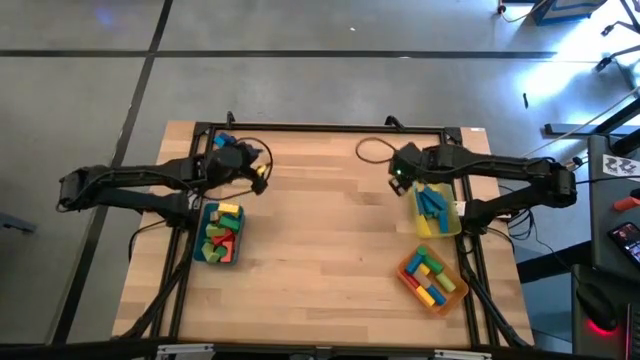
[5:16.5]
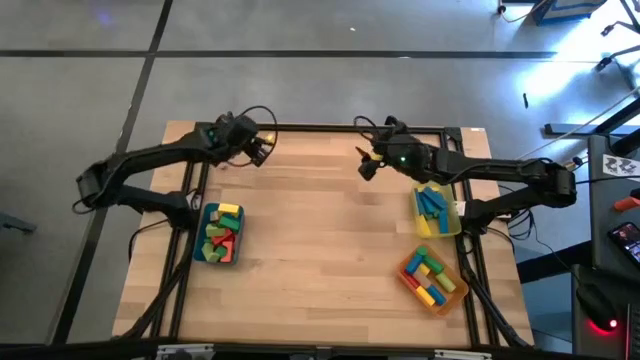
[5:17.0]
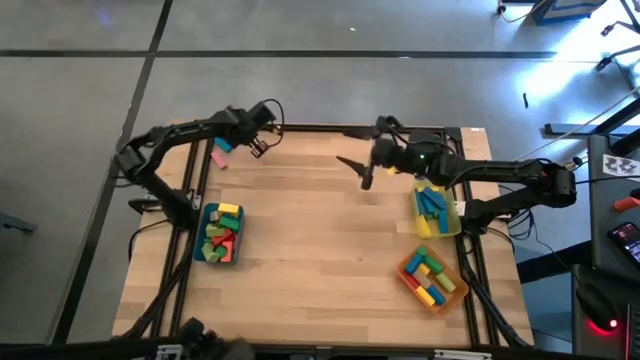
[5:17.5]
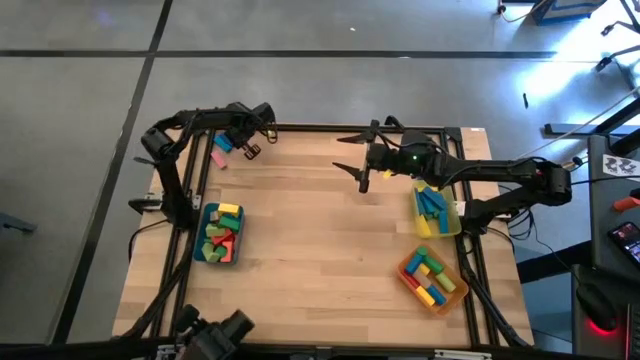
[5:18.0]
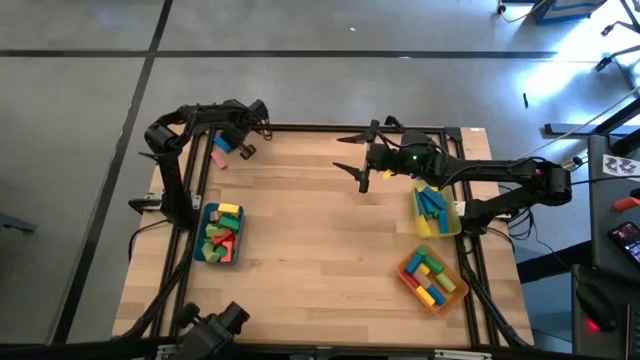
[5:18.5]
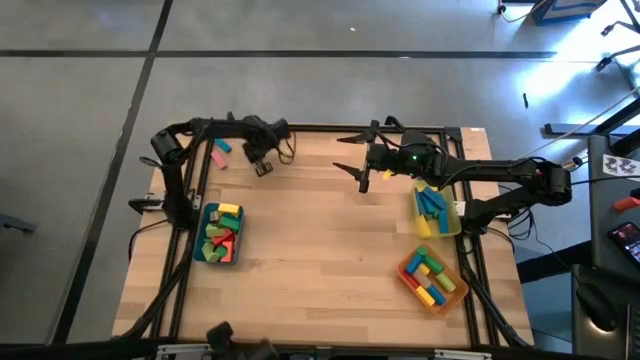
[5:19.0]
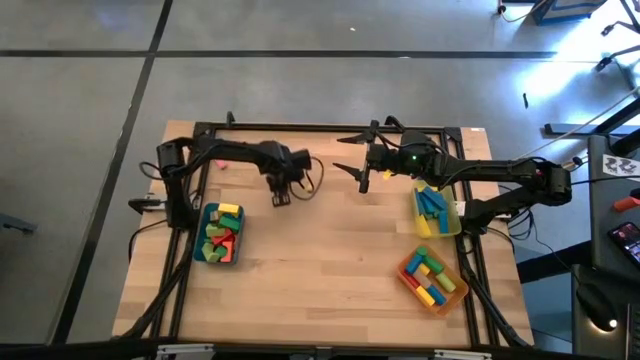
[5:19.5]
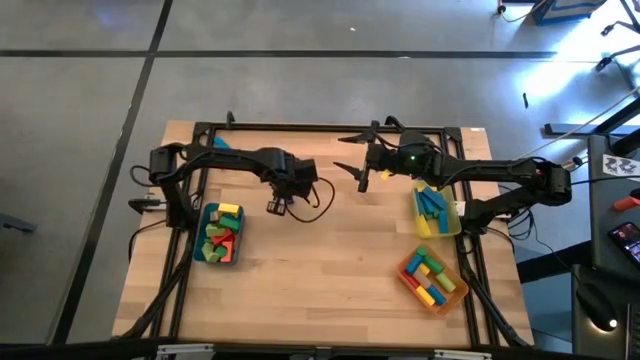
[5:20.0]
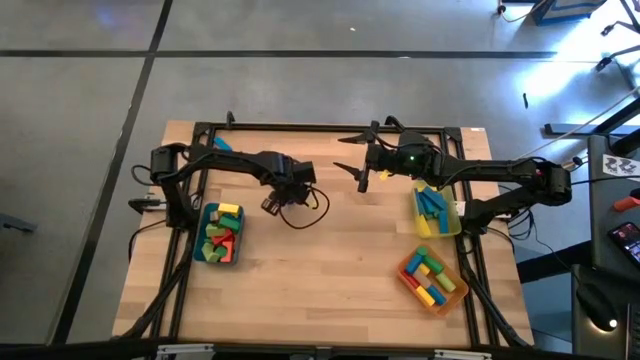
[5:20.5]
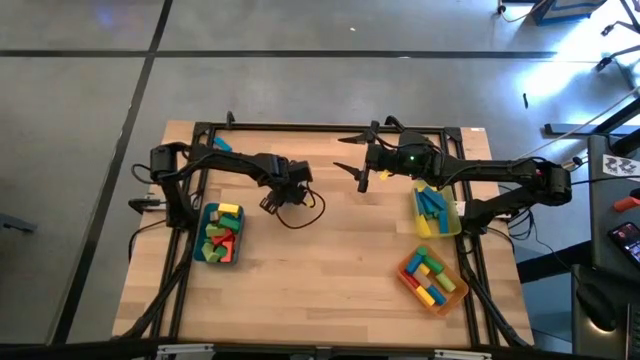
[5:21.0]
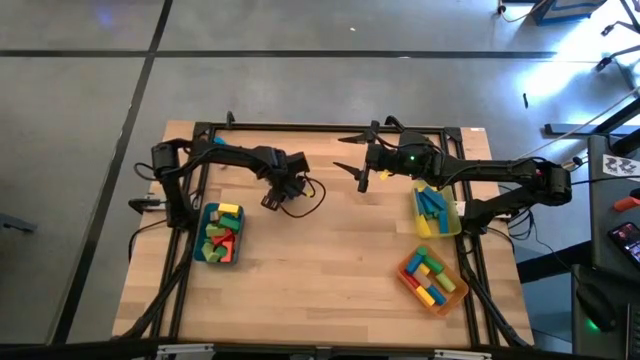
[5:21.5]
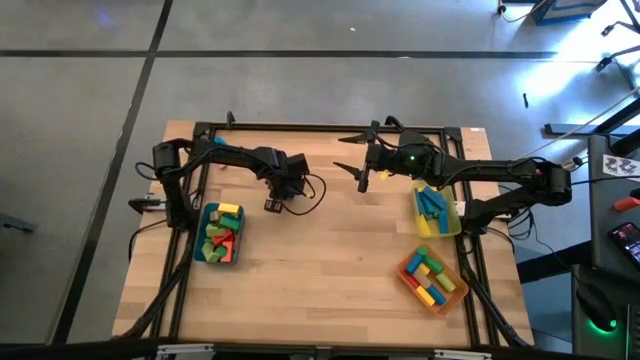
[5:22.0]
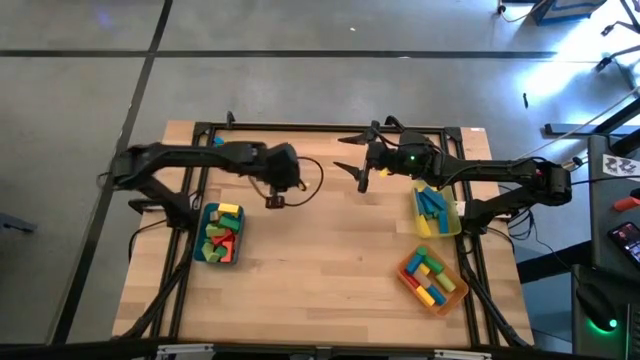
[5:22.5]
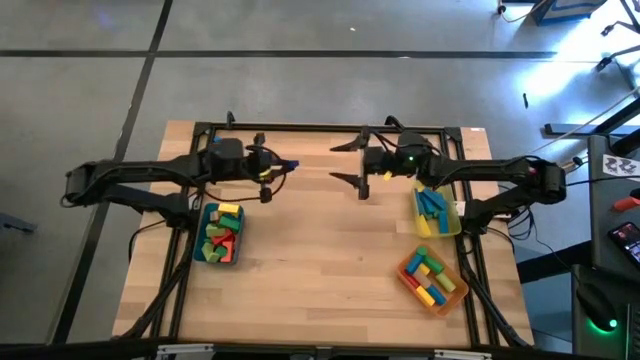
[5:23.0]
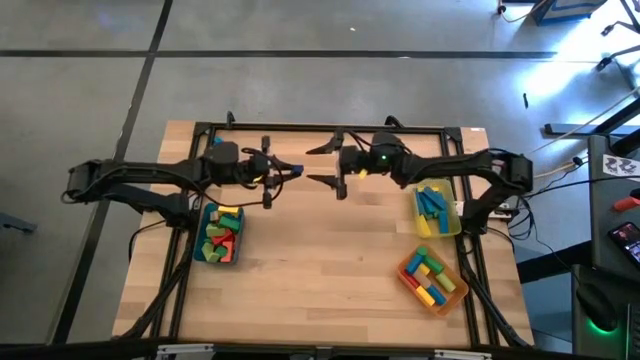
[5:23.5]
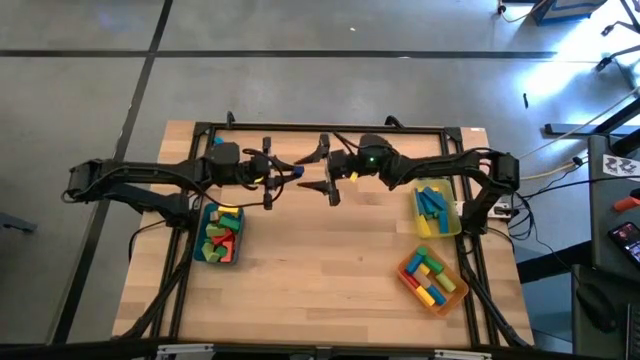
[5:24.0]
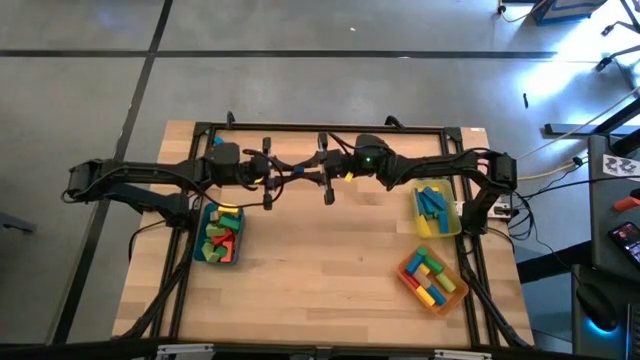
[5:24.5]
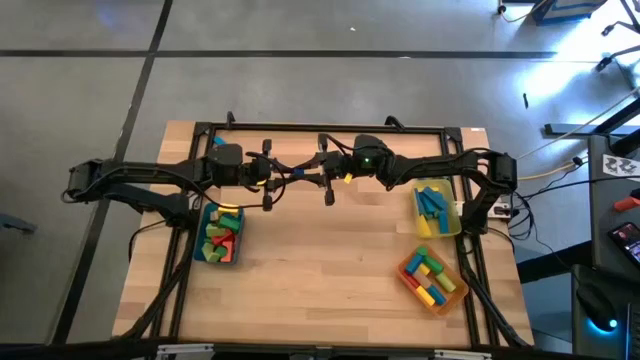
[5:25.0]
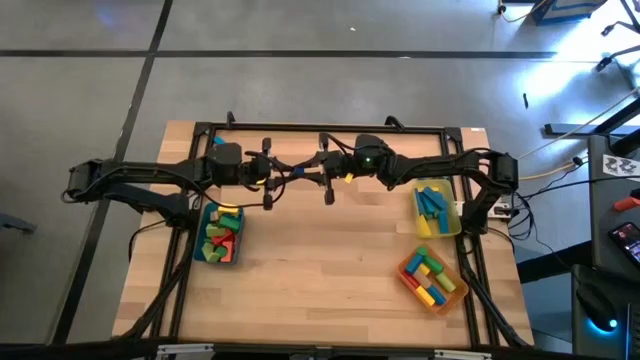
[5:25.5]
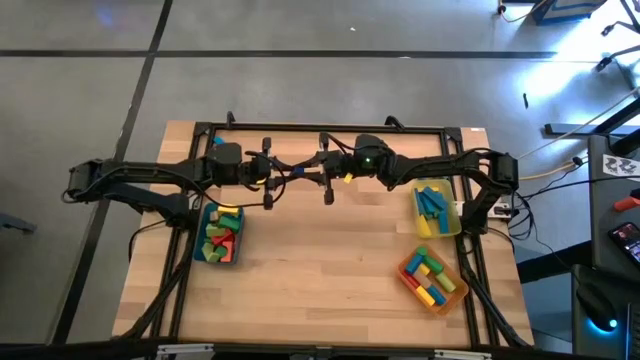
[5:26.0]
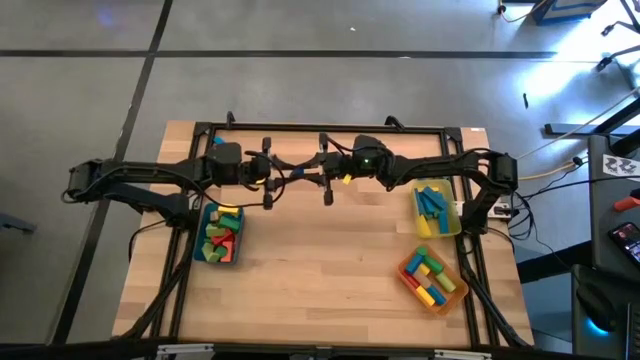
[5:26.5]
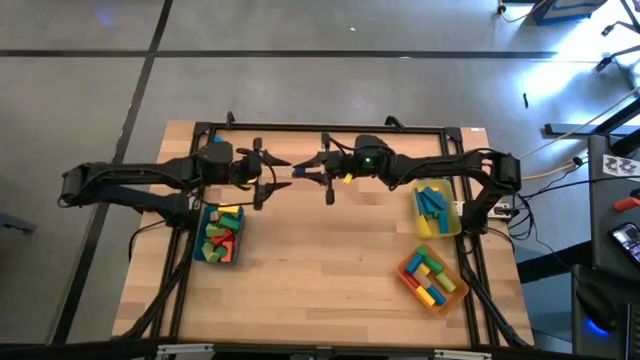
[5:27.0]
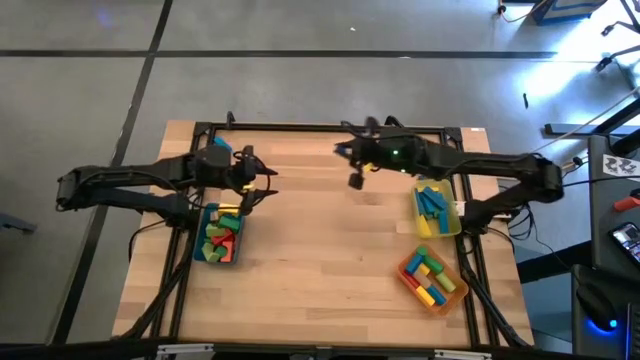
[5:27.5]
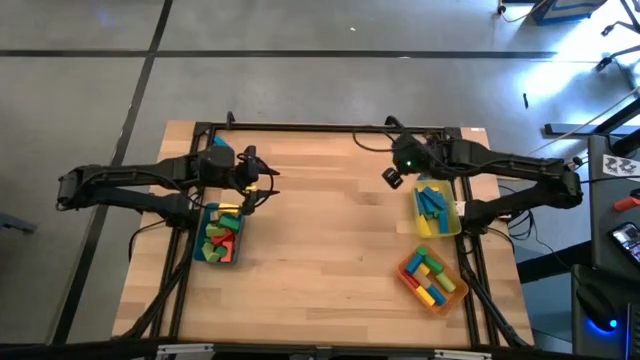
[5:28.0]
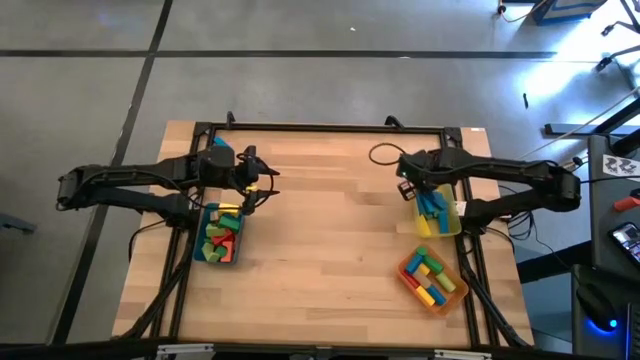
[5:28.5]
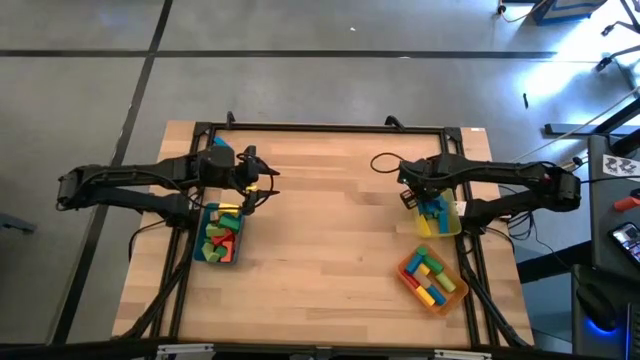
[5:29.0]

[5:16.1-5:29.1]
Task: Sort blocks by size
Put the dark blue rectangular block into the yellow bin

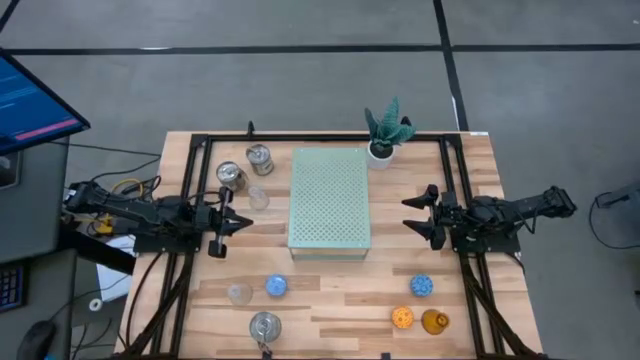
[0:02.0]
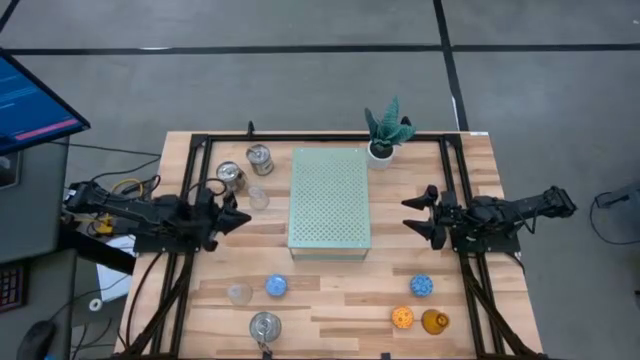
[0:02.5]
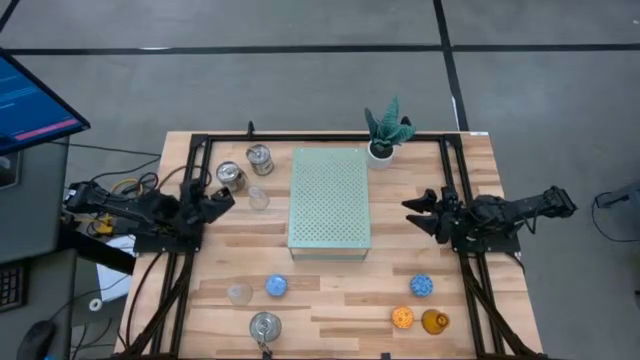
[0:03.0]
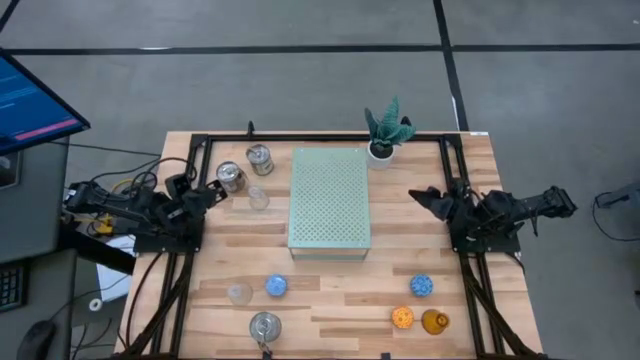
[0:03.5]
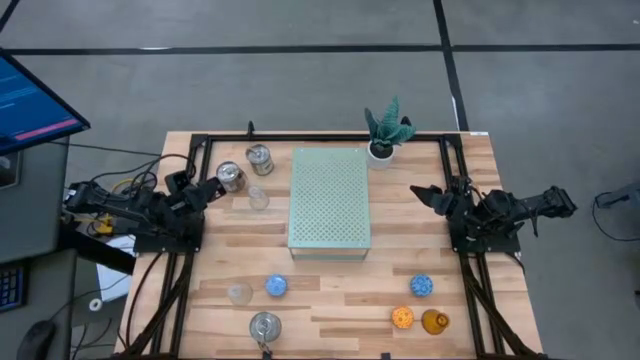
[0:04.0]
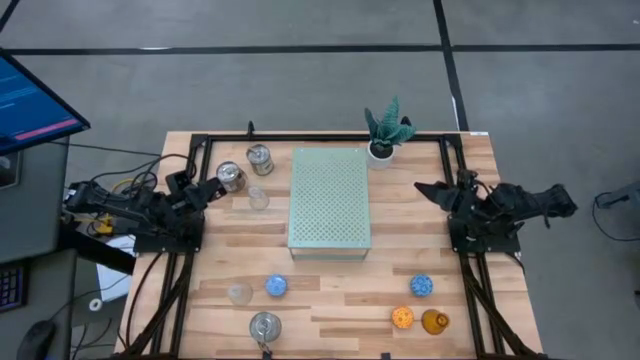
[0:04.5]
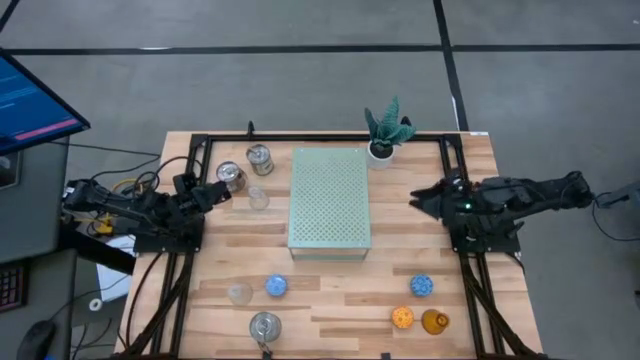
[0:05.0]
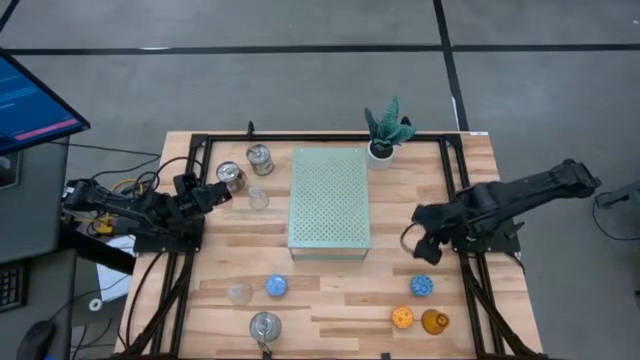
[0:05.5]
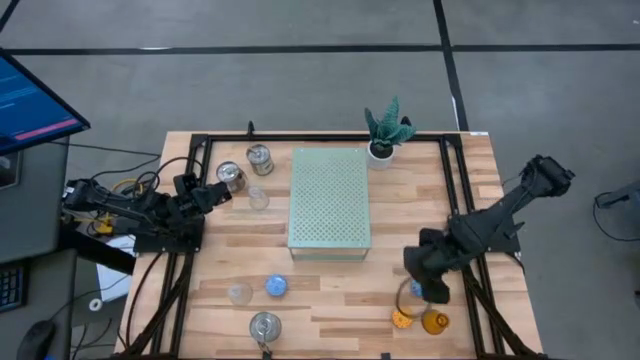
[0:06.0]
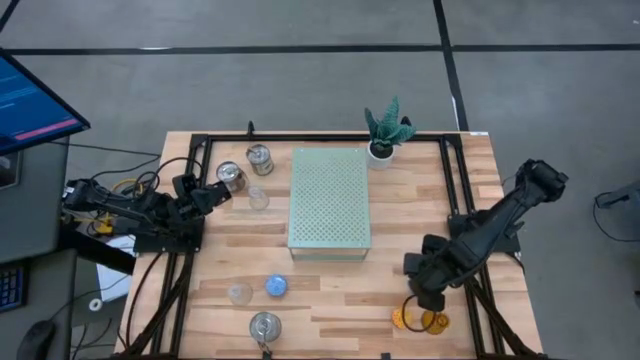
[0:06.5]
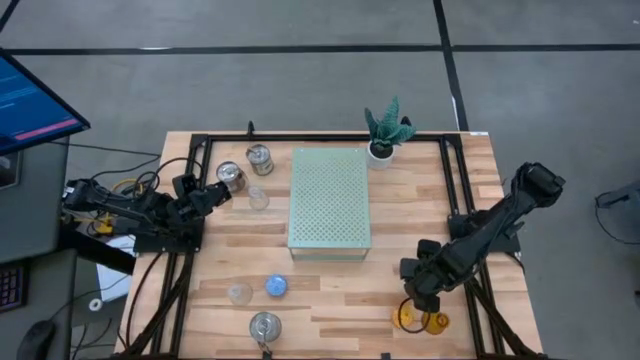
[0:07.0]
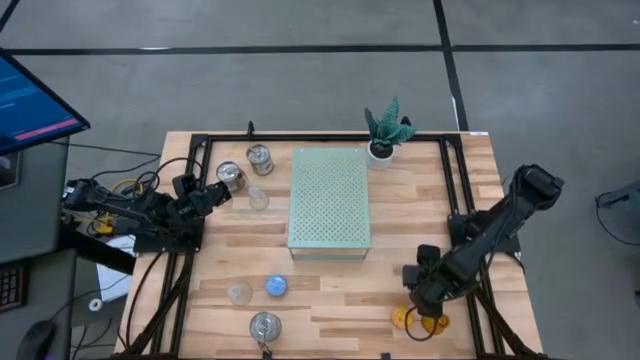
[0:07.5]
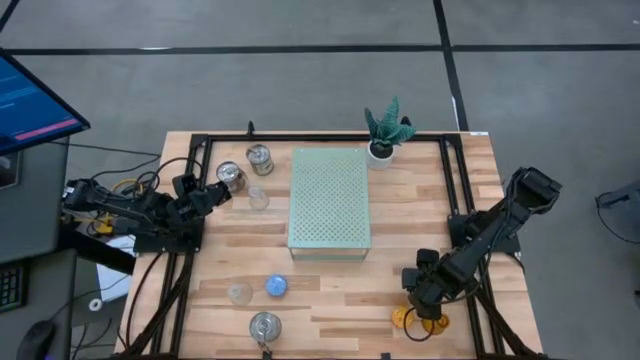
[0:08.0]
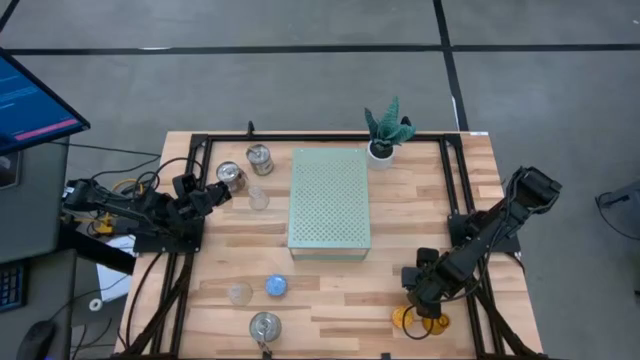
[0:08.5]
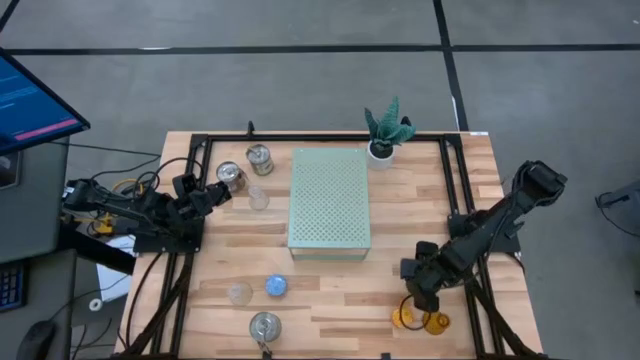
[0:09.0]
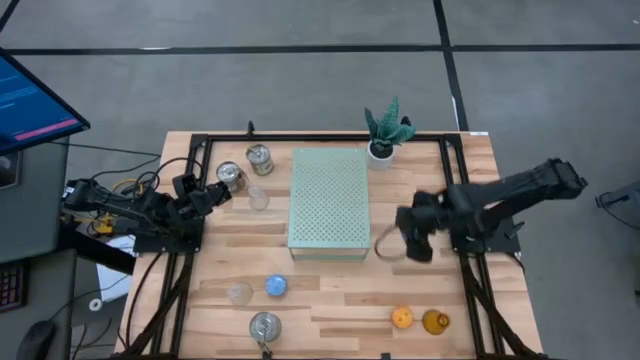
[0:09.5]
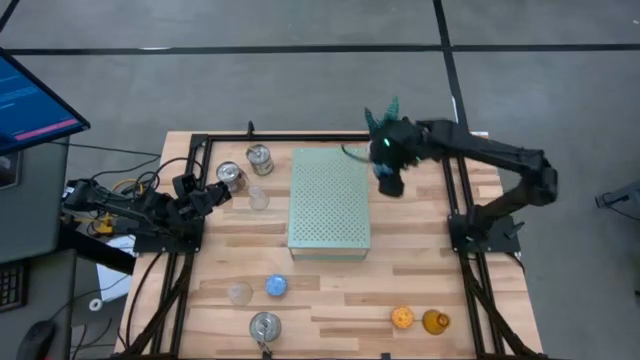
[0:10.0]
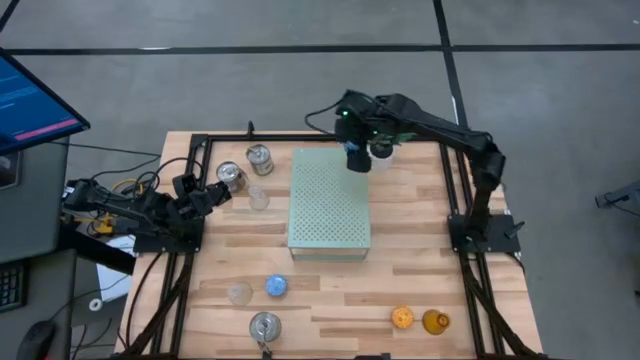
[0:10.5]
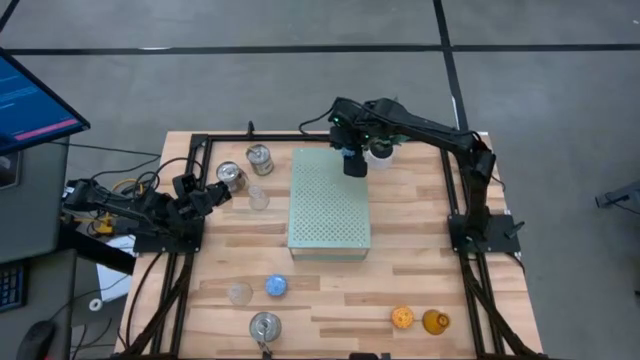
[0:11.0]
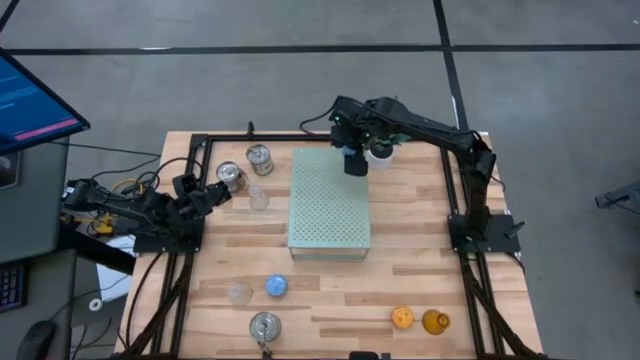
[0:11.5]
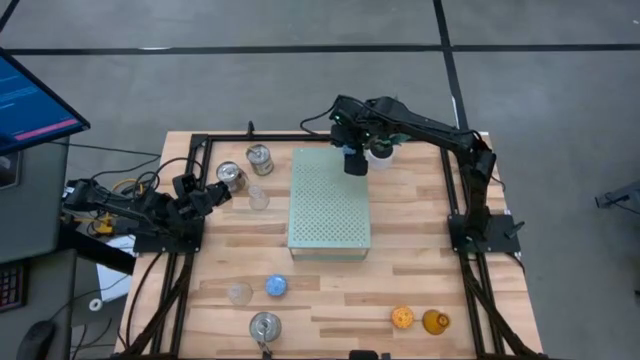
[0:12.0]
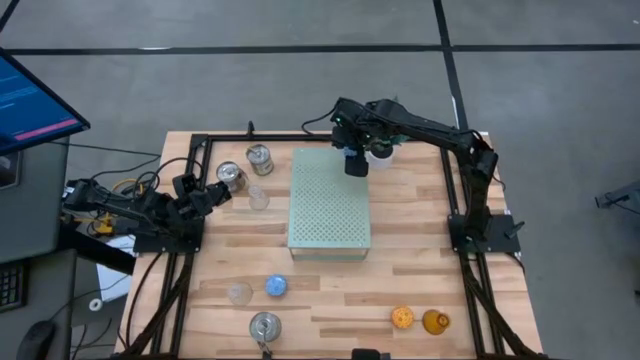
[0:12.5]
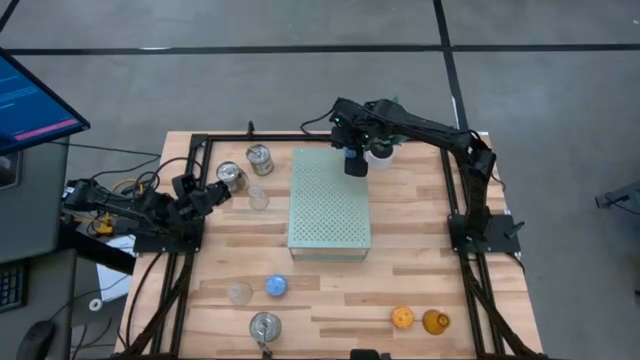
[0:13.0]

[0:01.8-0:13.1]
Task: Stock candles and holders on shelf
Put the blue scented candle on the shelf
